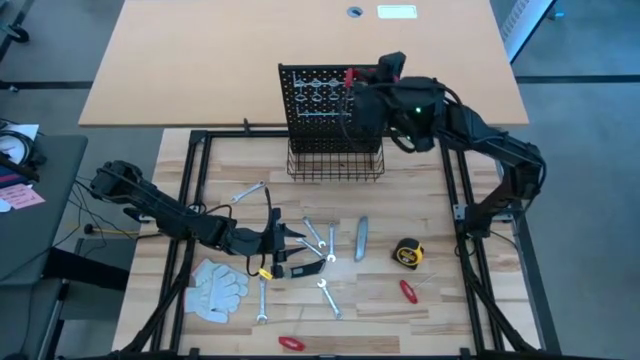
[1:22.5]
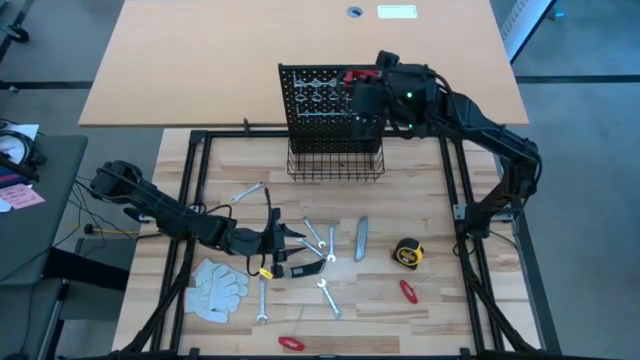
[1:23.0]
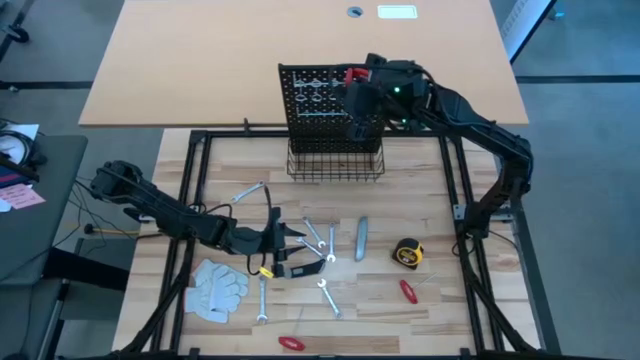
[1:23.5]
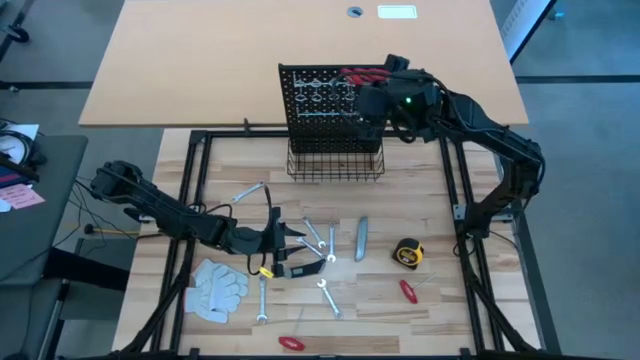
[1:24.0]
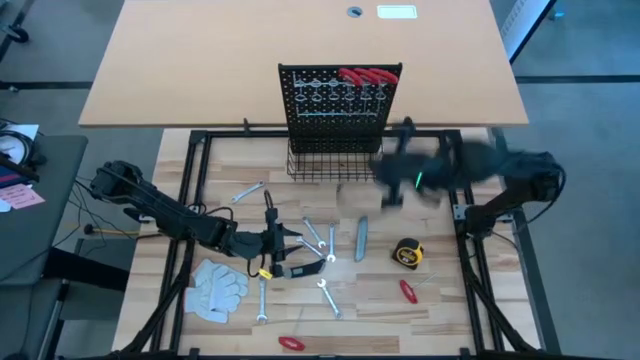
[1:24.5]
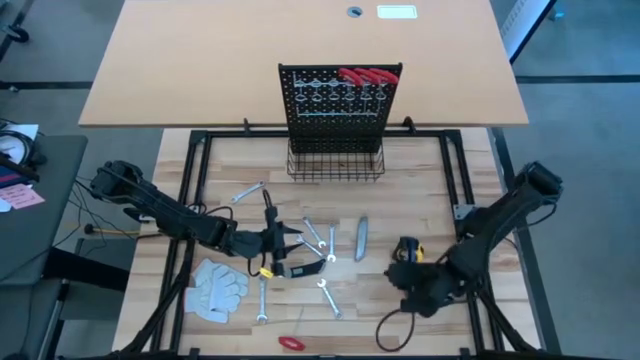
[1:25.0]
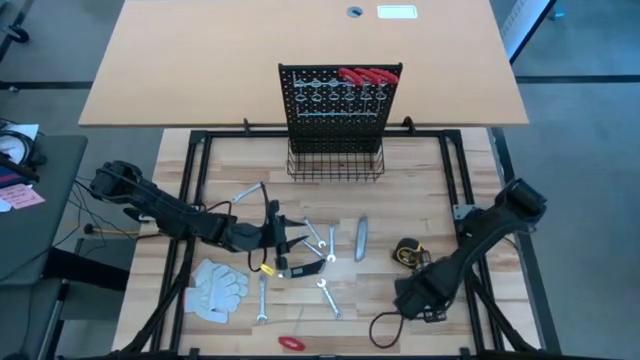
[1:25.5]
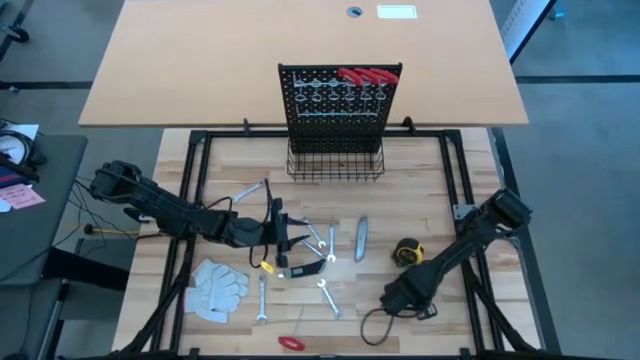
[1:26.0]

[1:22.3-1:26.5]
Task: Hang tools onto peg board
Hang the red allen wrench on the pegboard

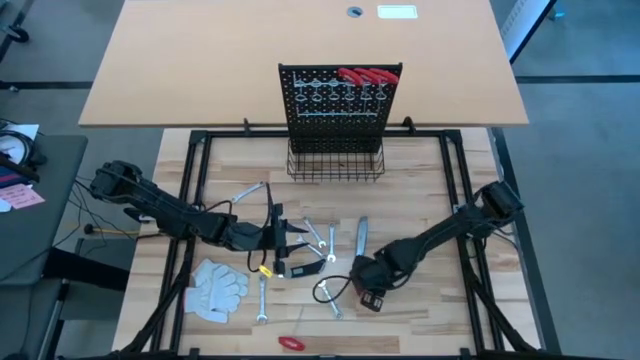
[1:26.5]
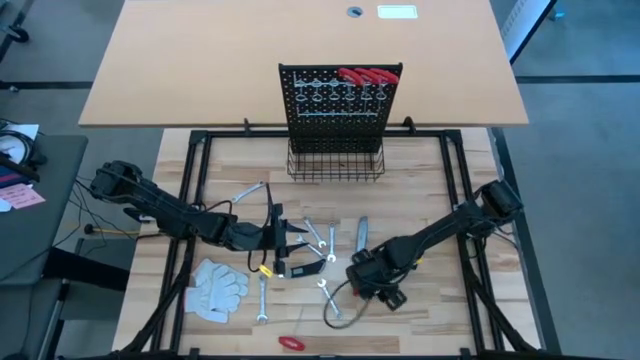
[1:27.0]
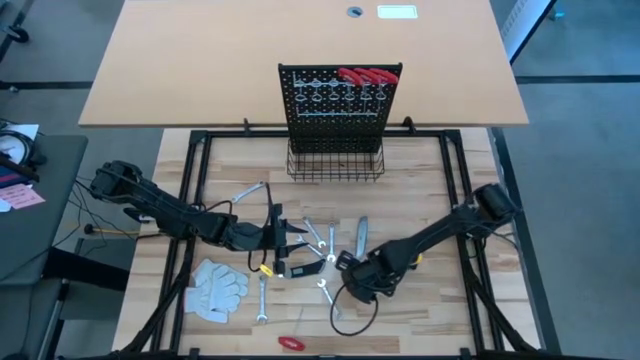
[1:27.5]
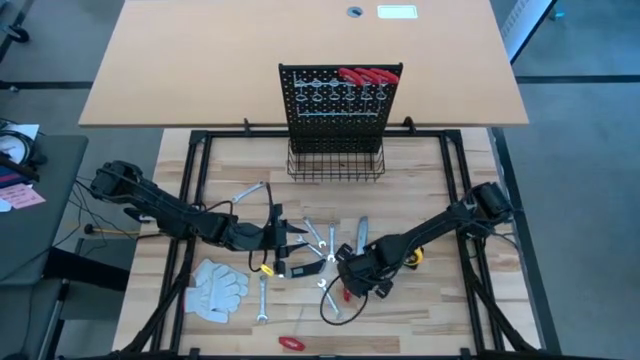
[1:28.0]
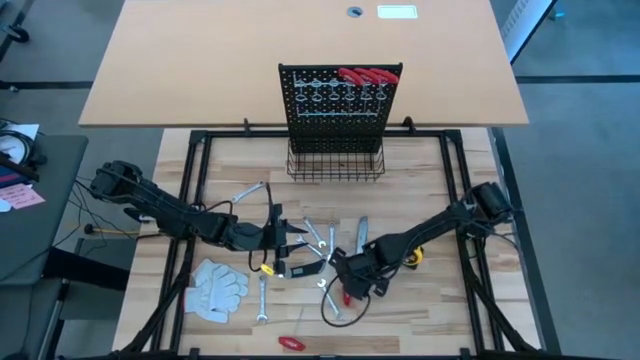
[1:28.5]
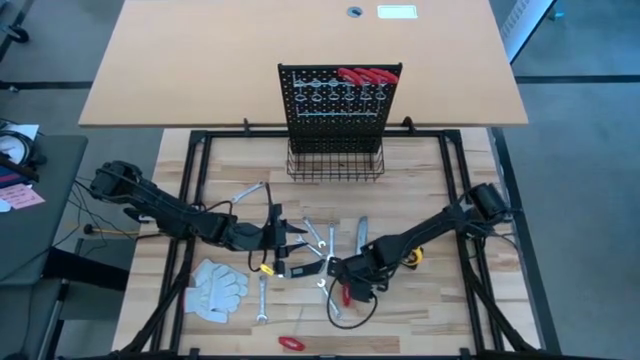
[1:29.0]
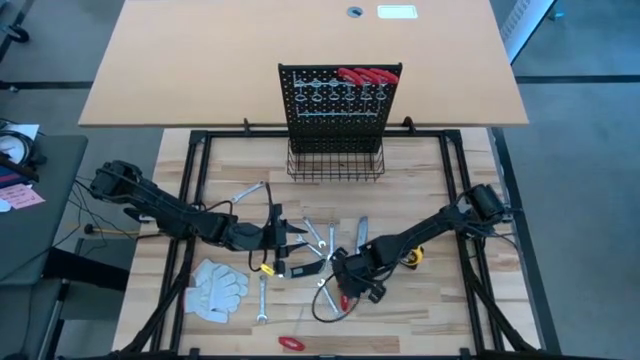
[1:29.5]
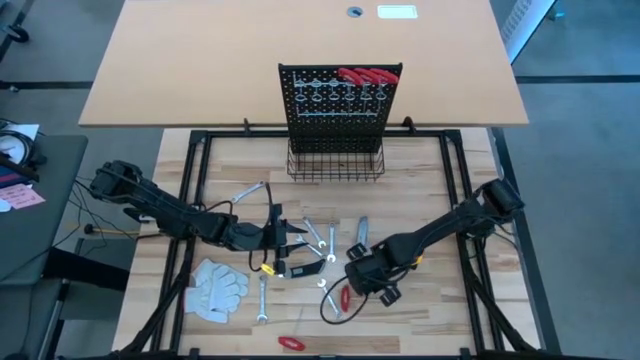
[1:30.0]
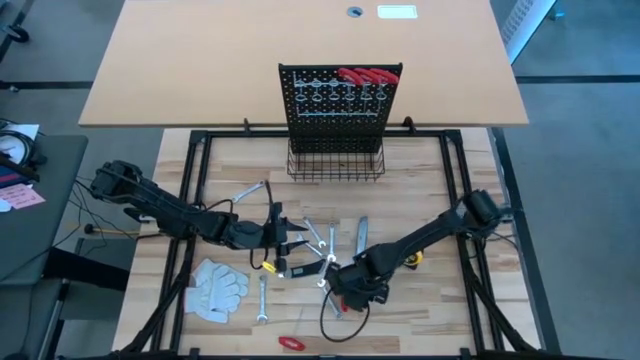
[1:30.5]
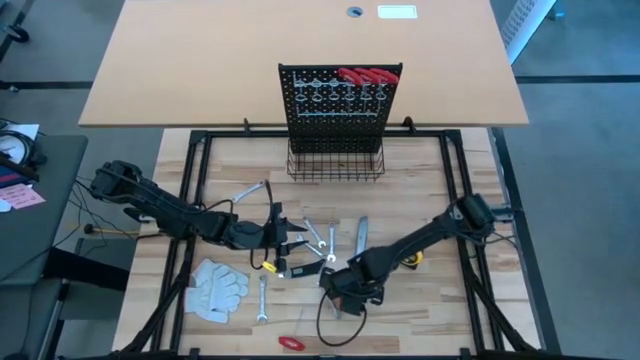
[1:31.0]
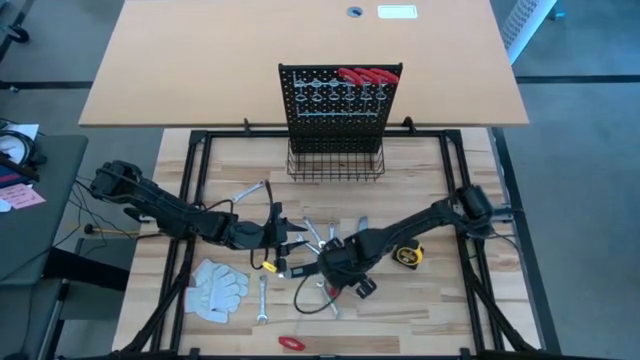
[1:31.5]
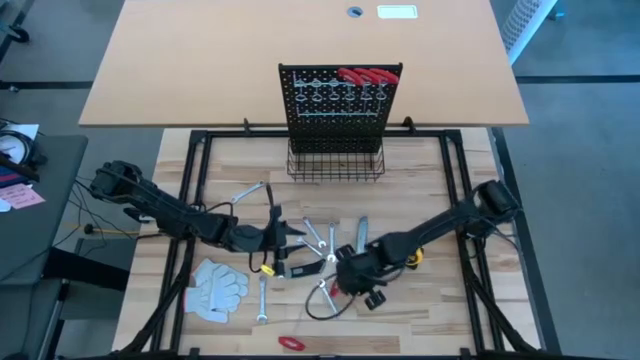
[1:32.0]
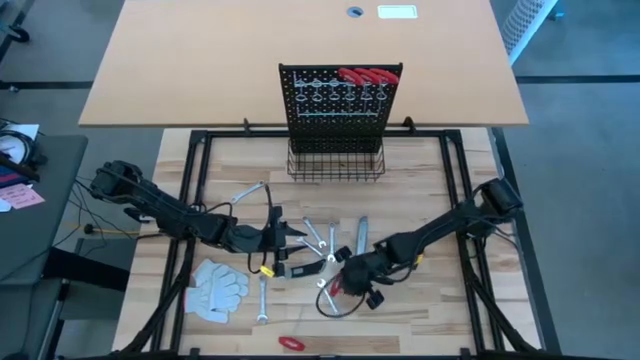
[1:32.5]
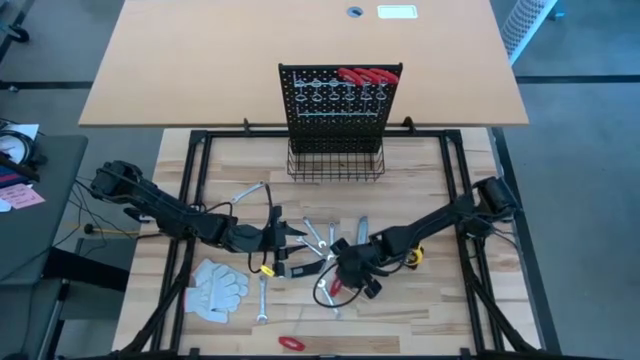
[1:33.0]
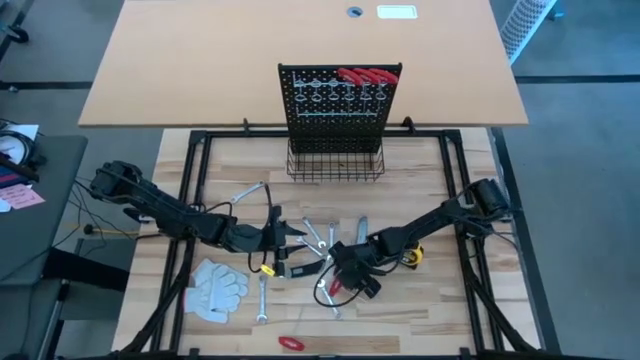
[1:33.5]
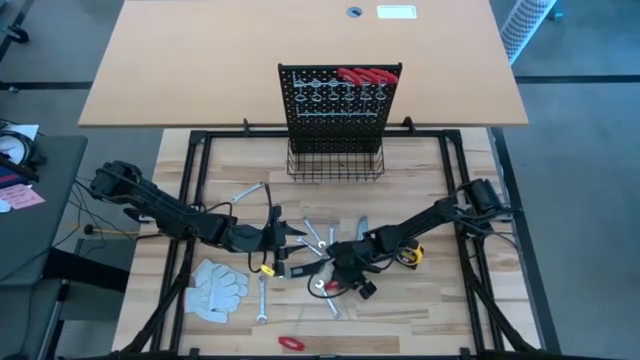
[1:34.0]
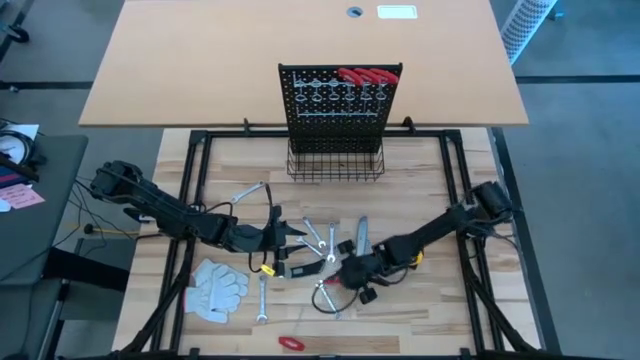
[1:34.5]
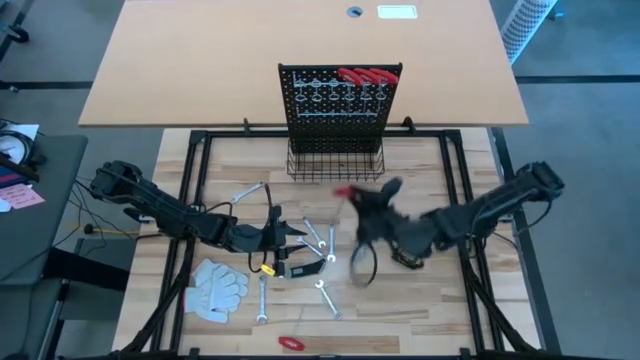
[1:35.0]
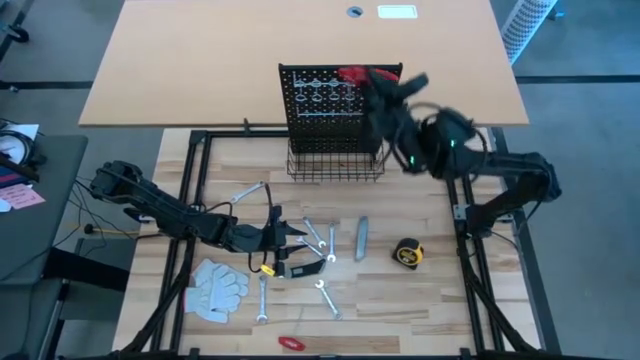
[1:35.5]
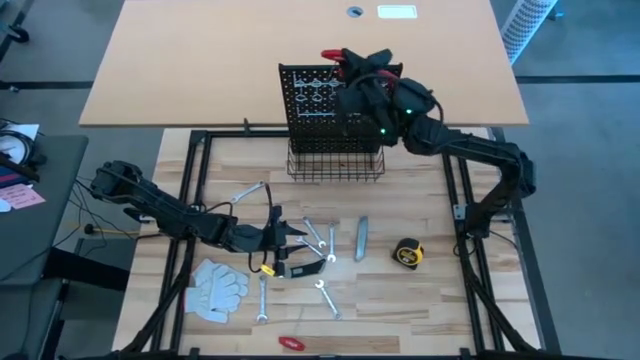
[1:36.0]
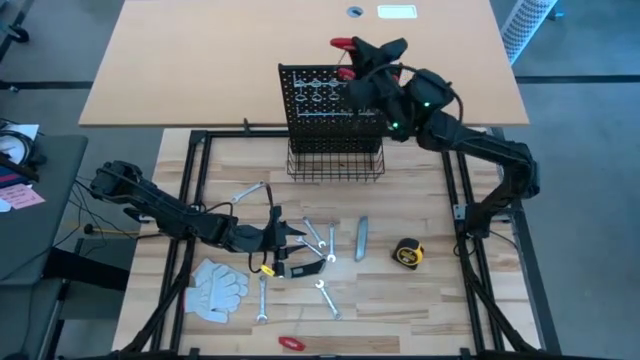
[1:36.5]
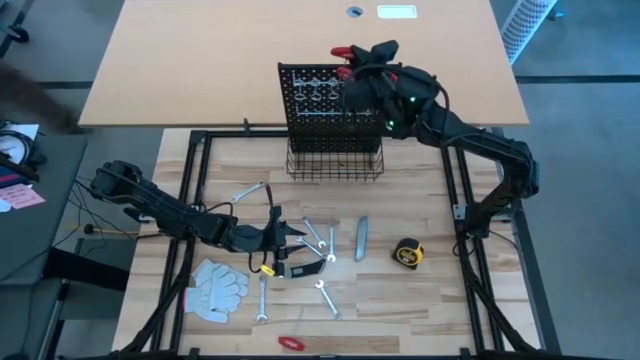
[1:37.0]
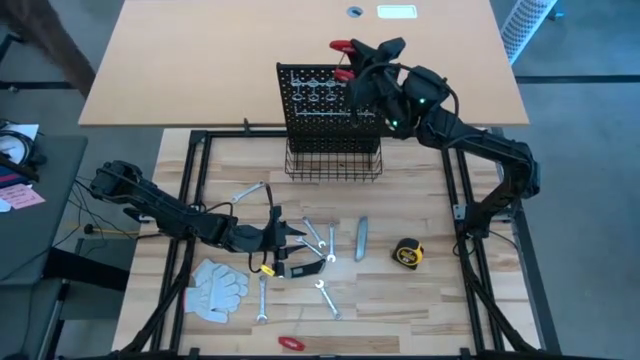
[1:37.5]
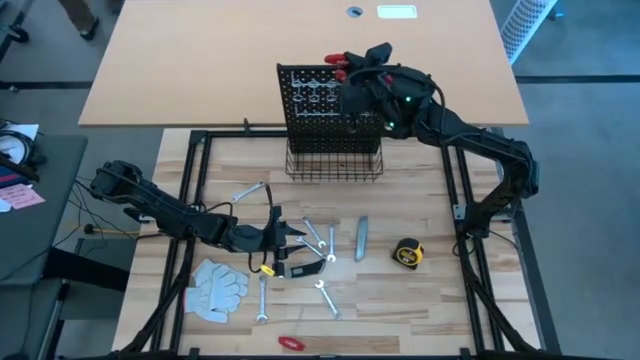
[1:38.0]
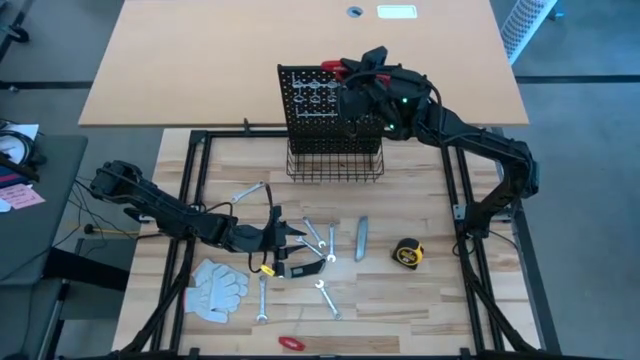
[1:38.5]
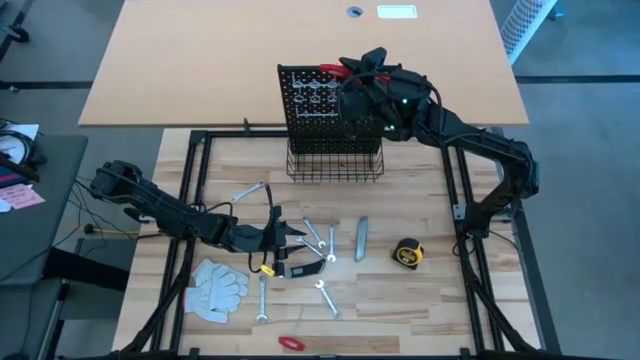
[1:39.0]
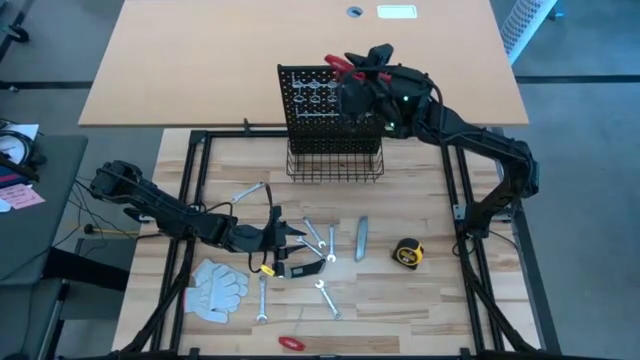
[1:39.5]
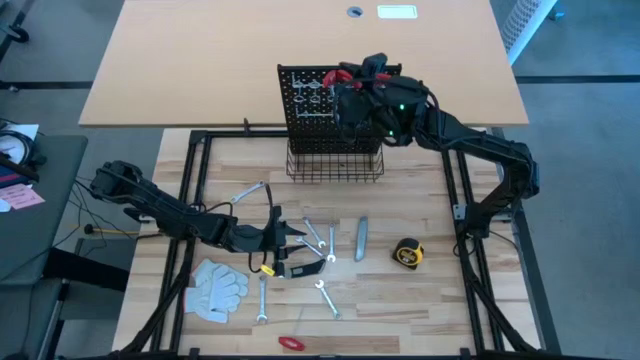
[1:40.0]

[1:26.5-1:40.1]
Hang the red allen wrench on the pegboard

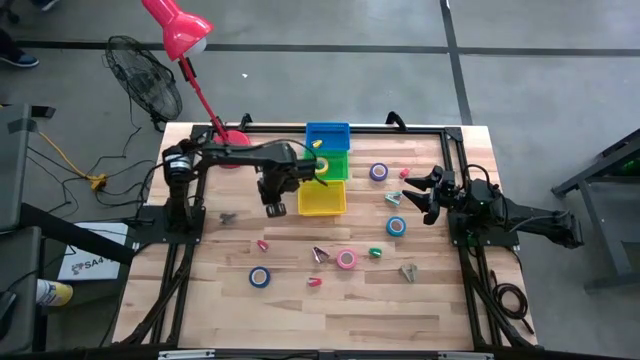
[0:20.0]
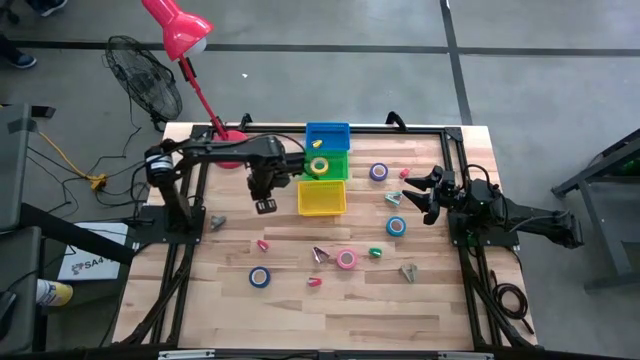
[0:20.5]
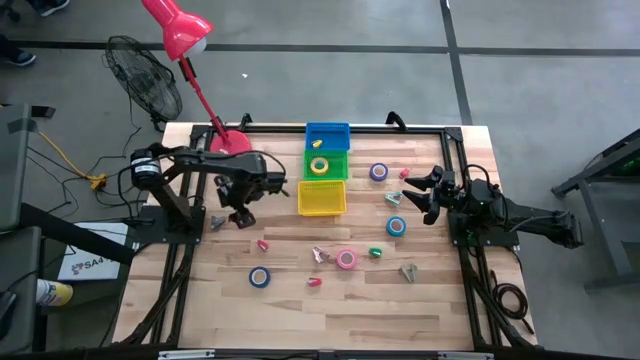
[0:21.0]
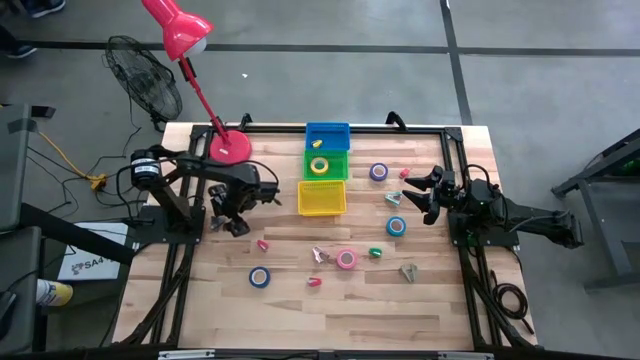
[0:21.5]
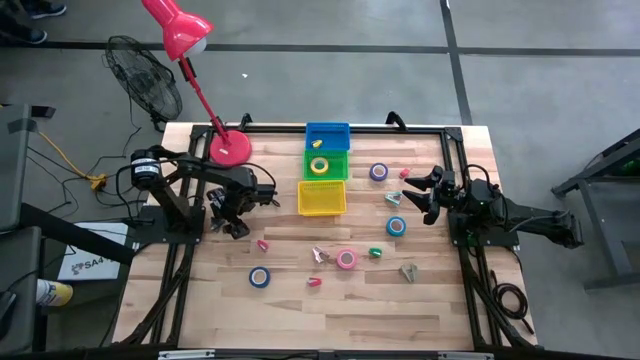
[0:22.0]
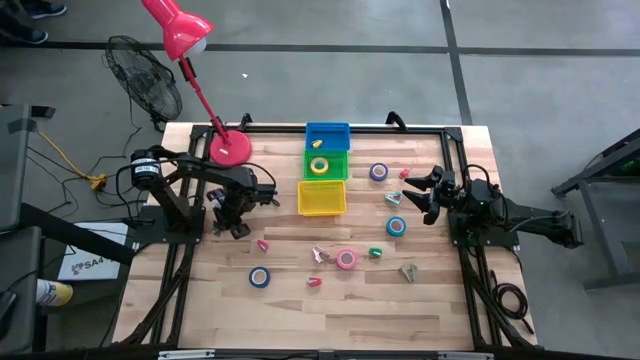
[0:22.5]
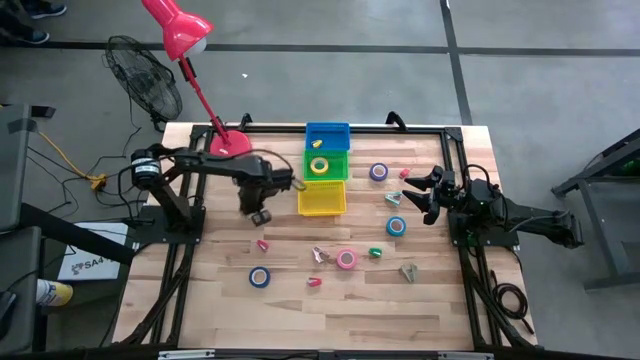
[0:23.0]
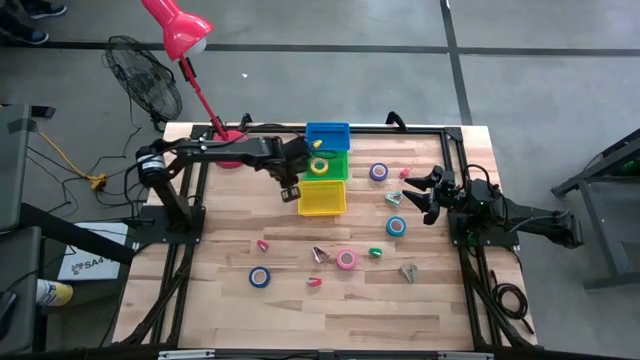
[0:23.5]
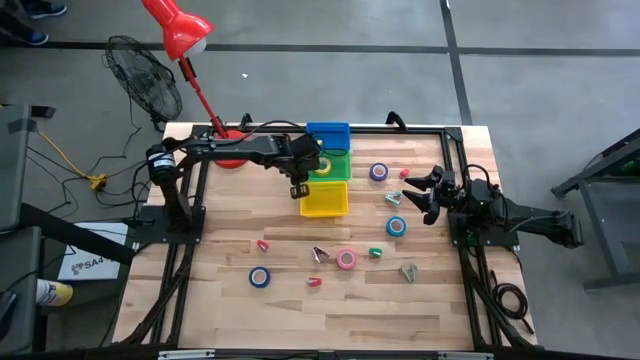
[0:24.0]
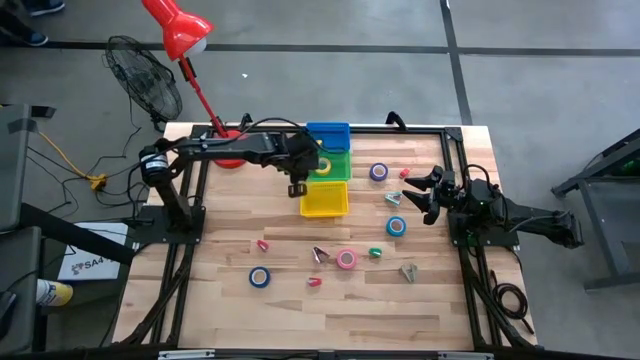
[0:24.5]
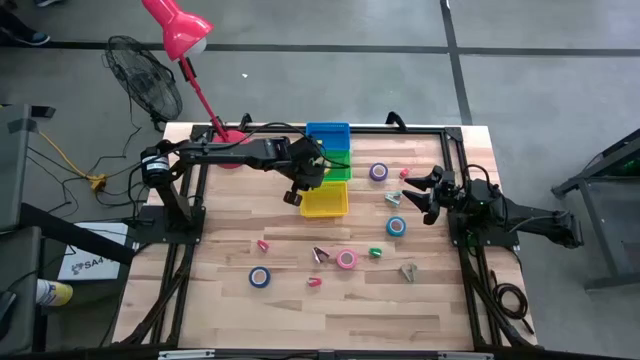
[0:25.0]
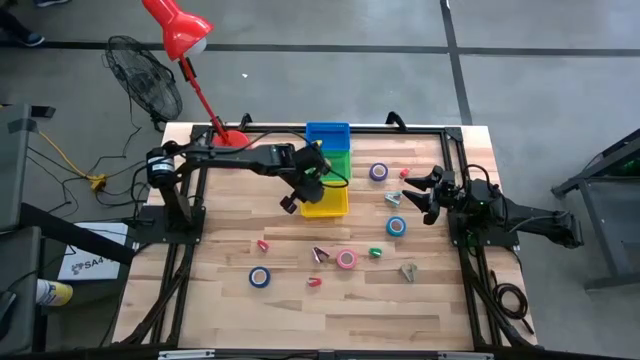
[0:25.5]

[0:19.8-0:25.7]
Task: Pick and place Stapler, Stapler remover, tape
Put the black staple remover into the yellow bin
